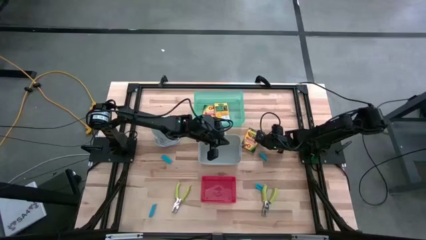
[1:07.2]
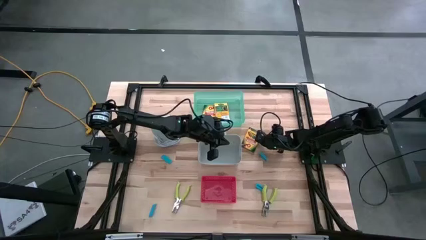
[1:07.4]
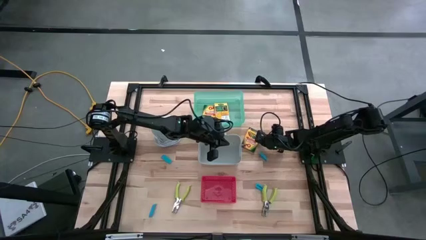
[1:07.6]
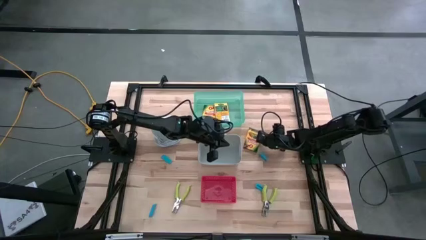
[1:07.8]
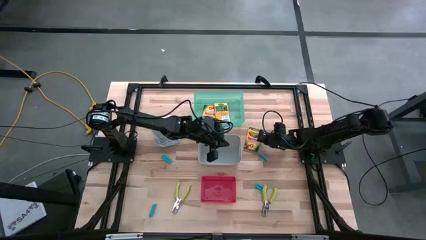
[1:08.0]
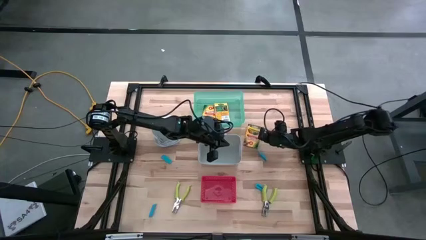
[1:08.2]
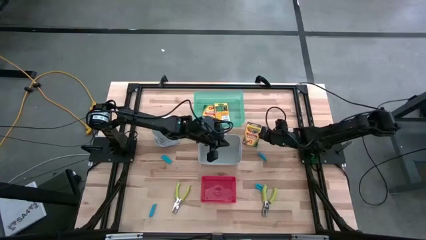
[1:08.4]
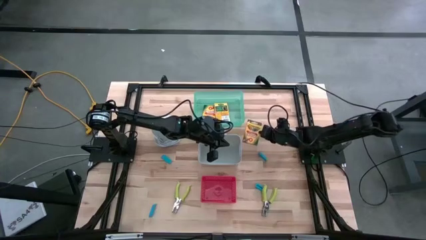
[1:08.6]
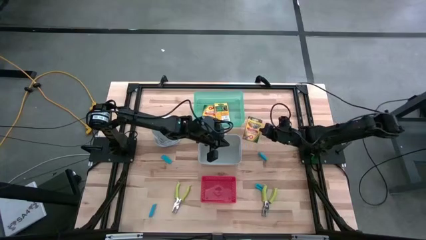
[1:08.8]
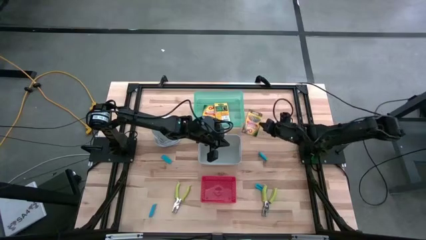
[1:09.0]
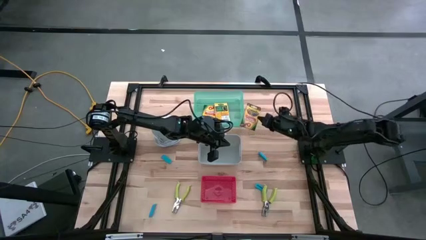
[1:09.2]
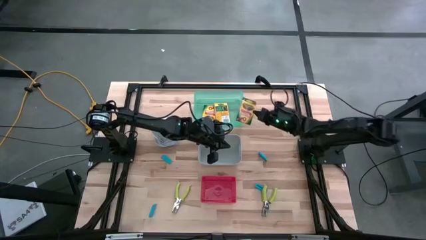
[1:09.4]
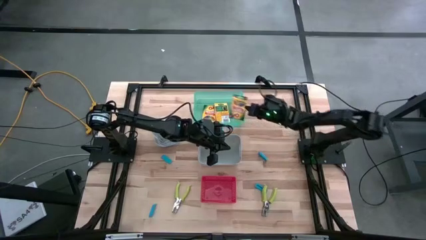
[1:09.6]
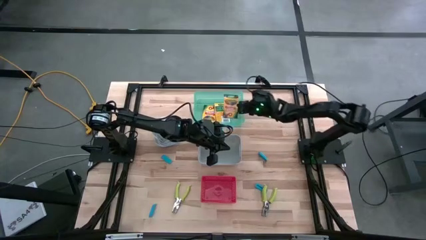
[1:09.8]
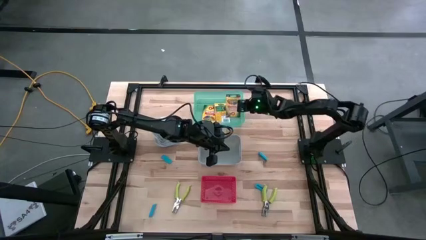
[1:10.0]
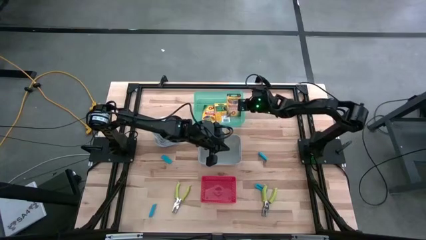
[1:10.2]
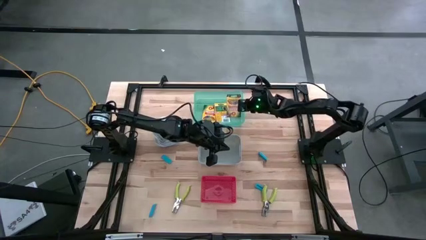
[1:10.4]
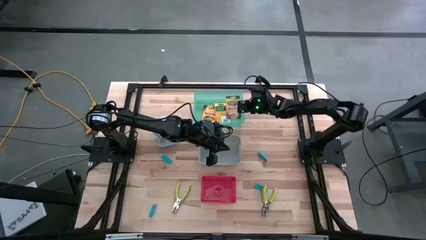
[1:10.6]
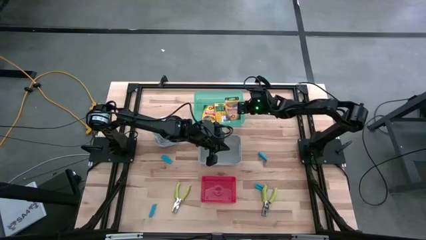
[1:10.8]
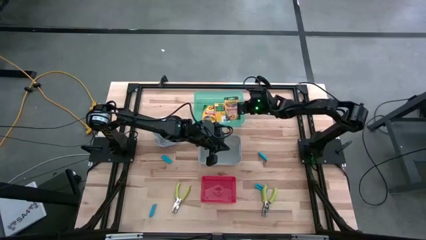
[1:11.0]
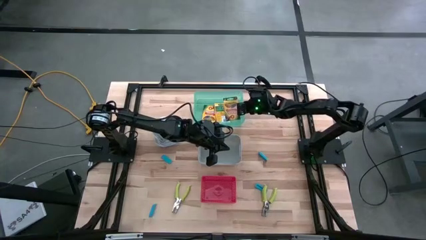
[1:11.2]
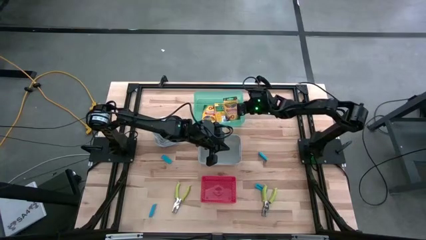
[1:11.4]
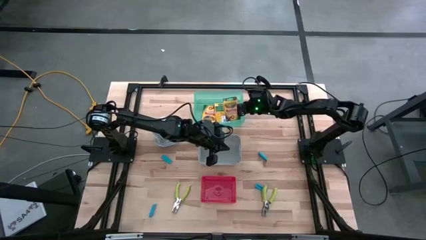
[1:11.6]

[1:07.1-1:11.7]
Task: Pick & Place School Supplies
Put the yellow crayon box into the green bin

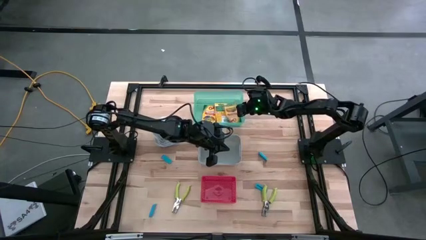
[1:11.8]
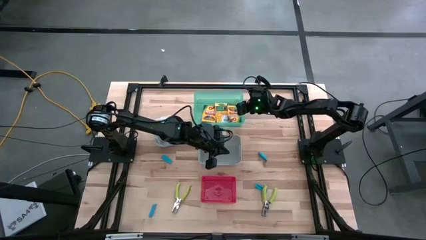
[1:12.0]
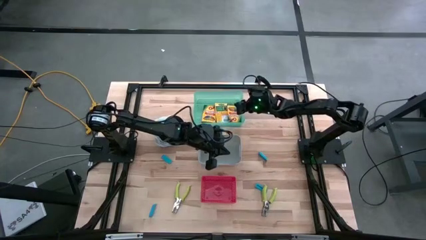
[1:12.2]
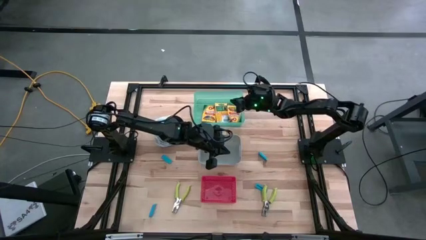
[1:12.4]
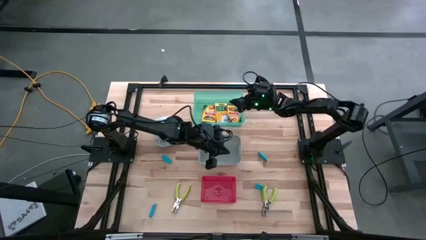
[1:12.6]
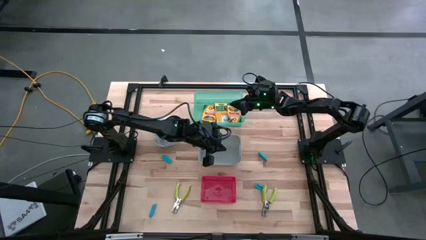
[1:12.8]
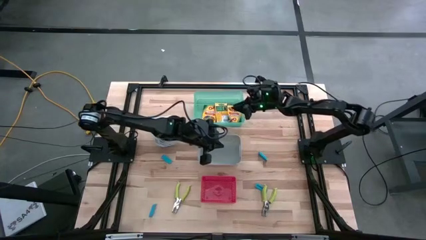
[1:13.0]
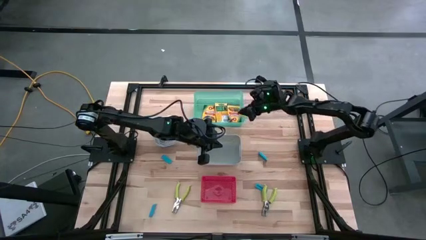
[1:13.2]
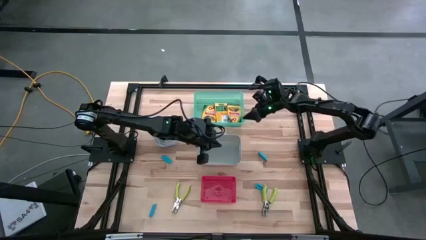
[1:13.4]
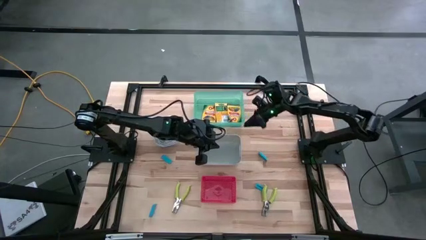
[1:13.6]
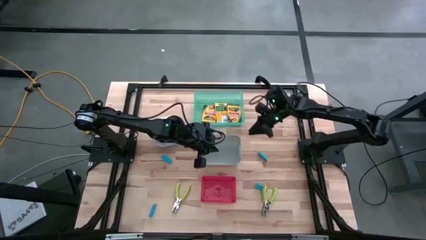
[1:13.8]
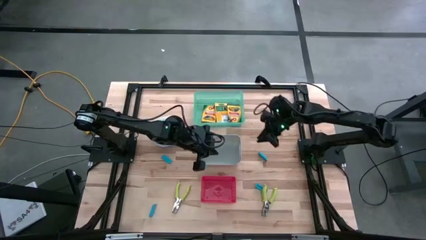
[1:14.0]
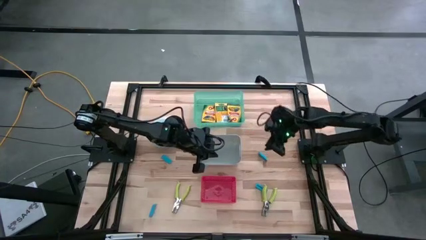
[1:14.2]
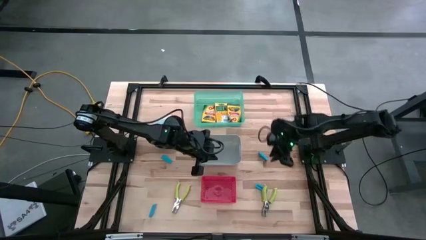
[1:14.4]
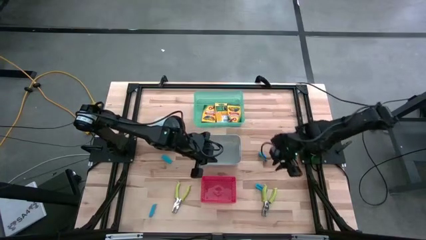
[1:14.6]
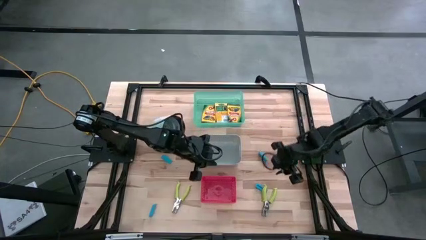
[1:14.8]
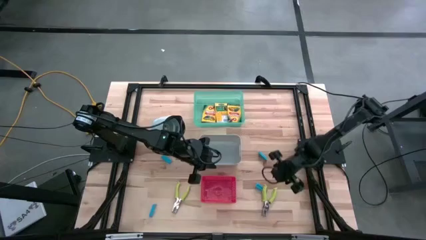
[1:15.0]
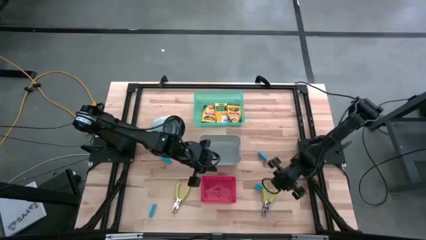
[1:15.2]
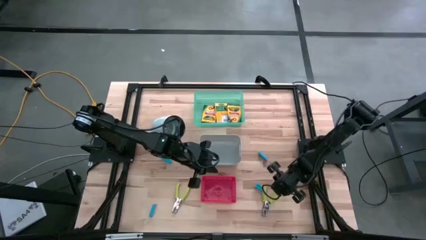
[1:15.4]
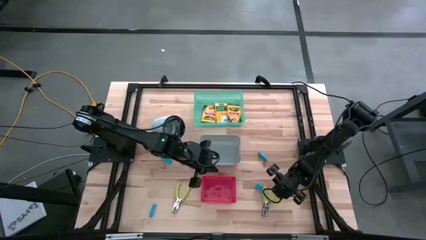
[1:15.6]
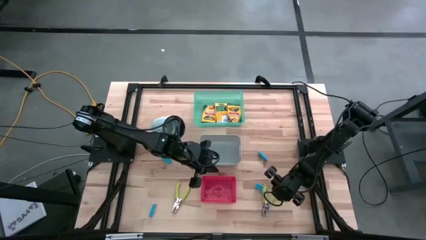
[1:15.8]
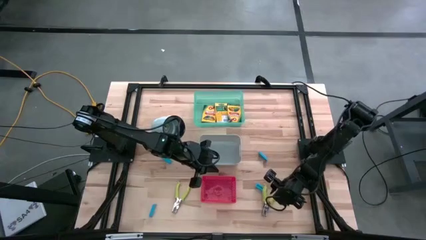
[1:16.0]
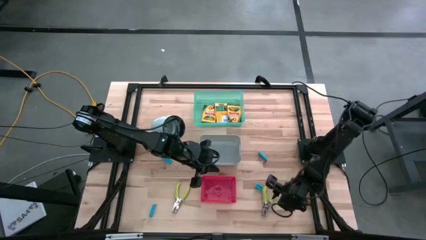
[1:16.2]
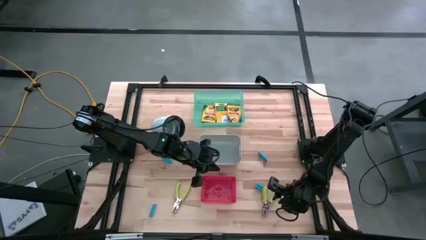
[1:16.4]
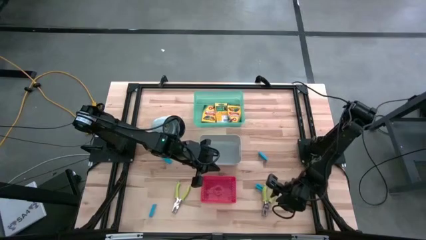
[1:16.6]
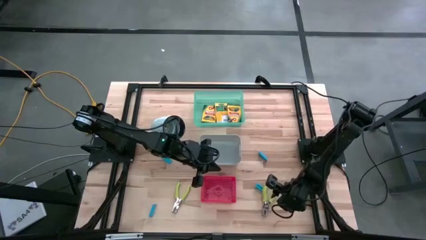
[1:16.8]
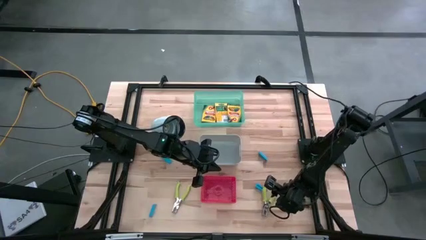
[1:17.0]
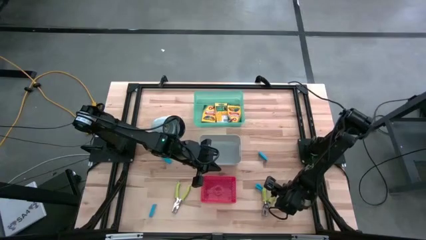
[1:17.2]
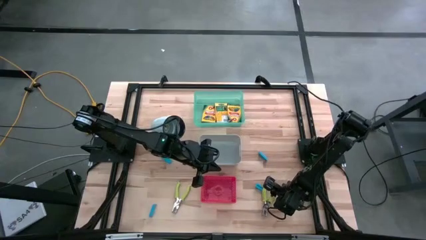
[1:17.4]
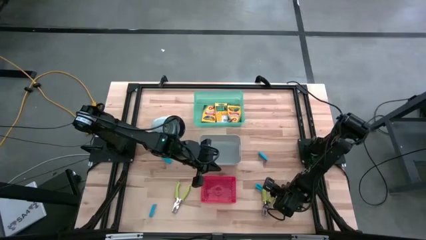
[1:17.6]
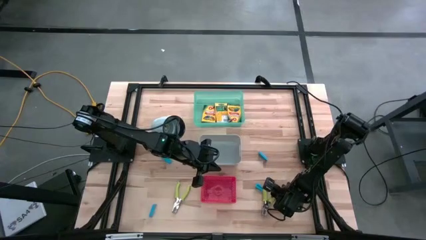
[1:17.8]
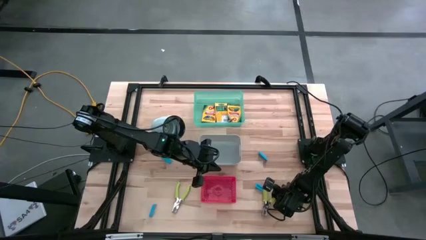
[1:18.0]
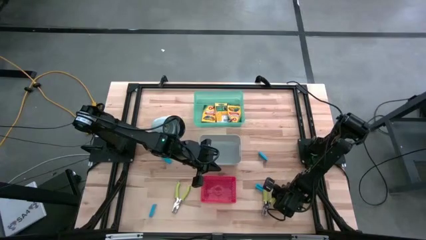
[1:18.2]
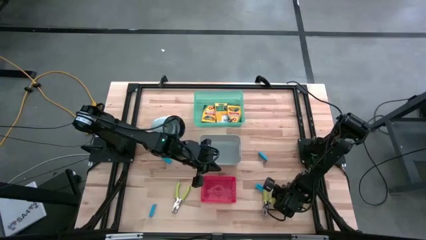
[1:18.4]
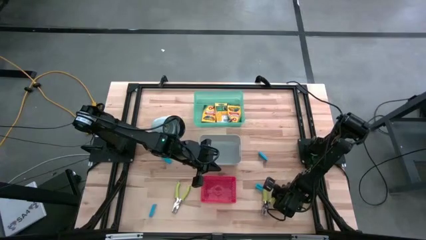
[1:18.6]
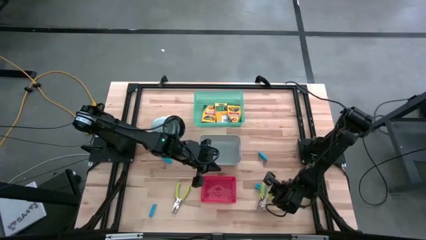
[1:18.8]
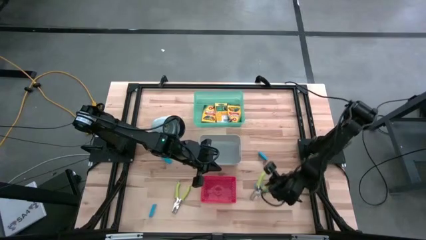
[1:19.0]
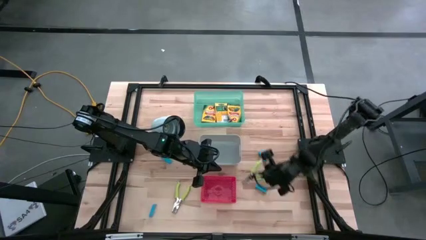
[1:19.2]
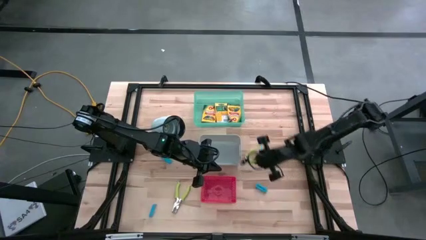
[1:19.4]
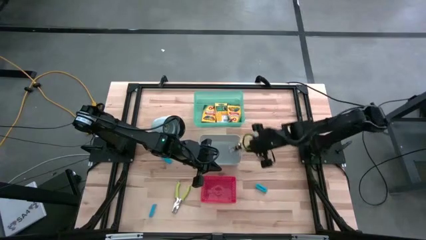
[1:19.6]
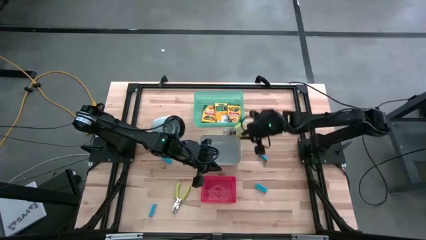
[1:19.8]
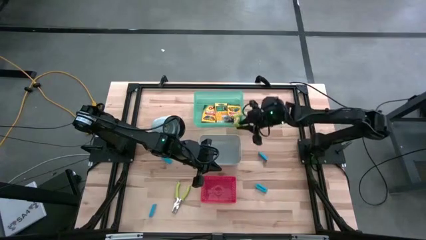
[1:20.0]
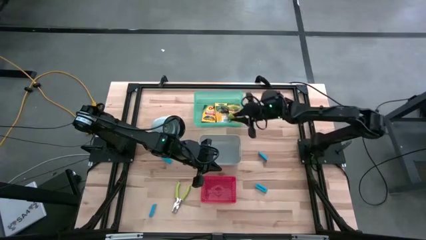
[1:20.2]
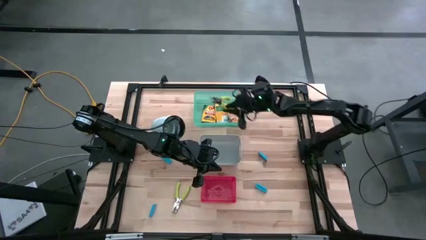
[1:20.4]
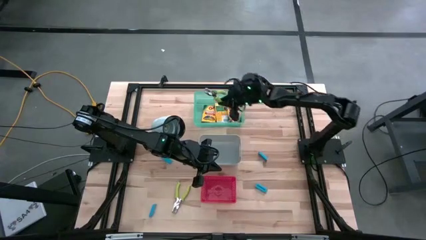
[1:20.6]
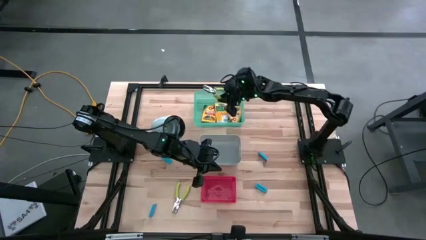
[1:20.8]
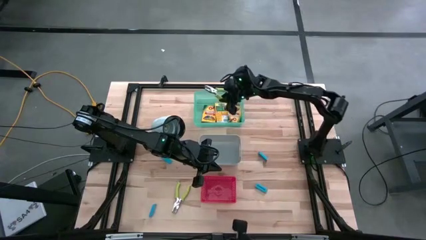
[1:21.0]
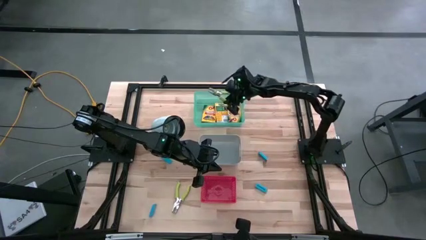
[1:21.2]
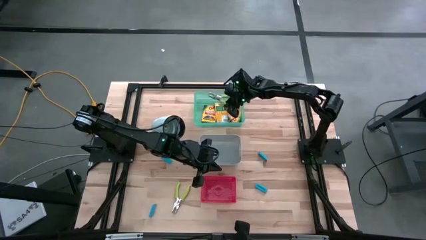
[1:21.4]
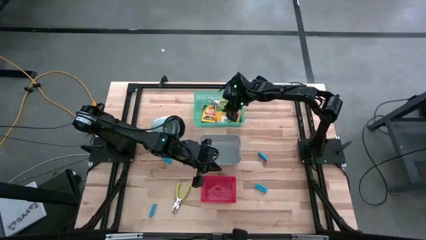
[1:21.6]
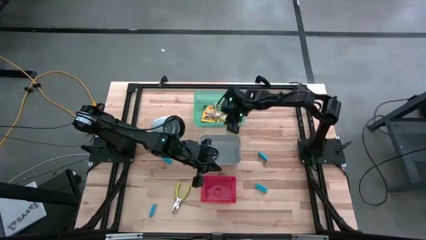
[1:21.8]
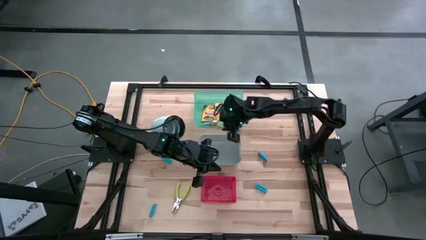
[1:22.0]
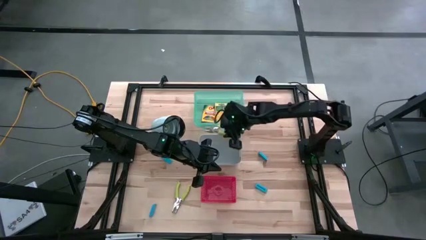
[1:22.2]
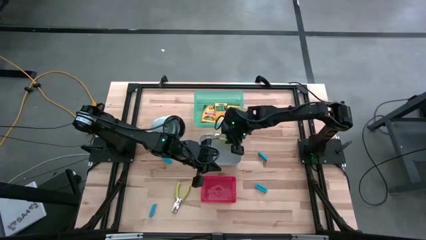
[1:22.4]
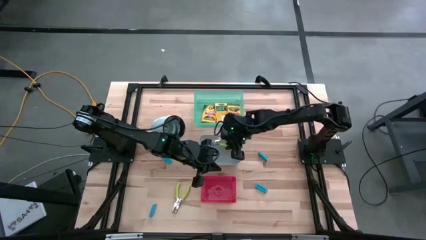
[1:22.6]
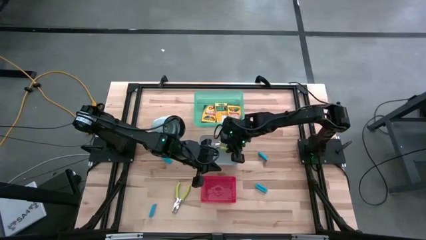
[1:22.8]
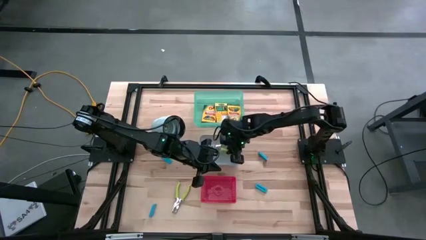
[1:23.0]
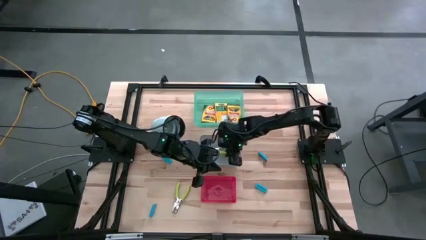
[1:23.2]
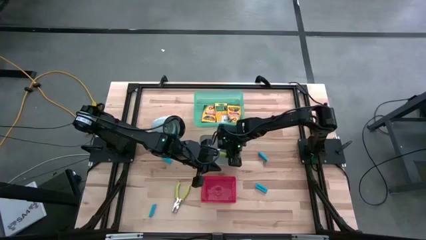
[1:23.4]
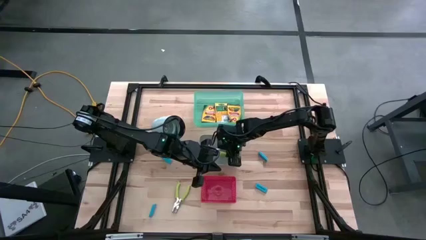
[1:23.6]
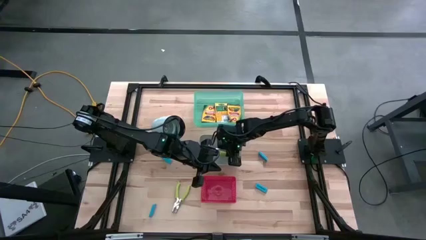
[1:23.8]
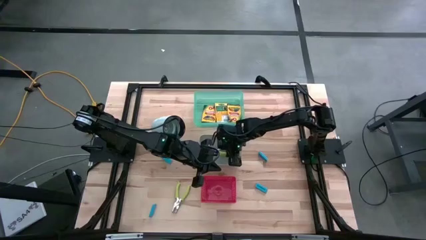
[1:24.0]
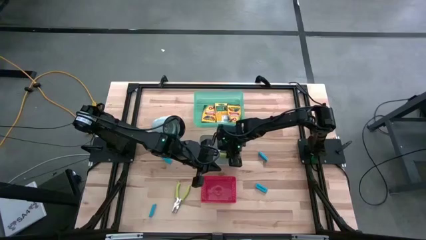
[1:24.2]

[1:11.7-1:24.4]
Put the right green hole puncher into the gray bin
